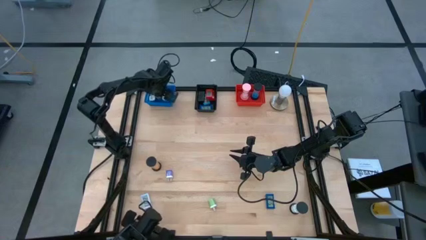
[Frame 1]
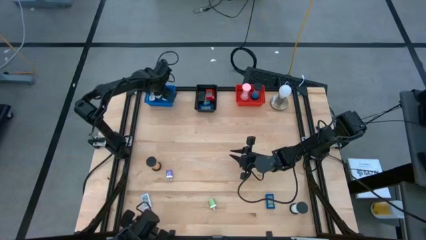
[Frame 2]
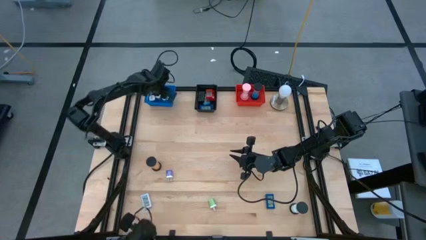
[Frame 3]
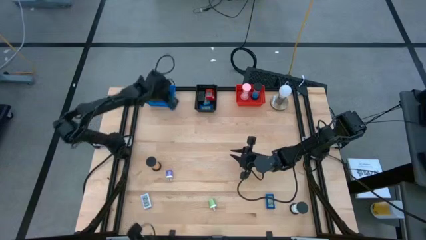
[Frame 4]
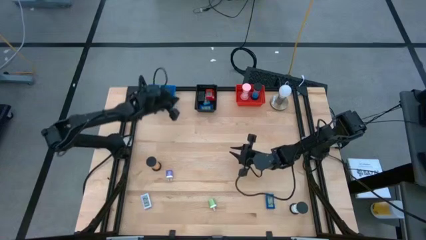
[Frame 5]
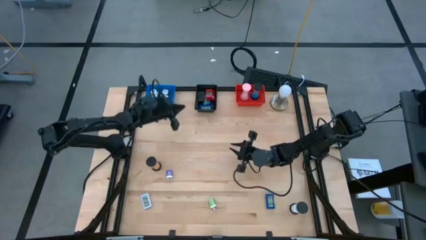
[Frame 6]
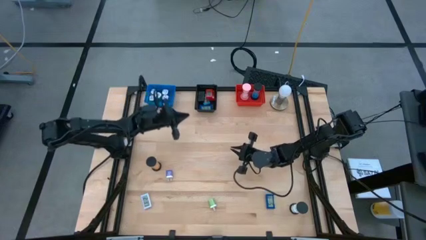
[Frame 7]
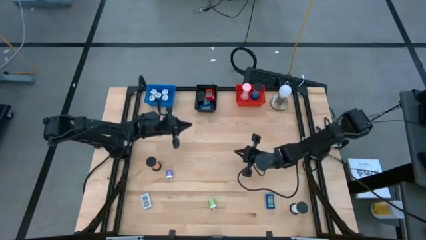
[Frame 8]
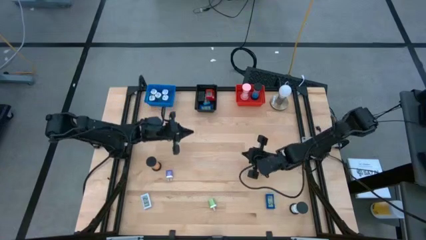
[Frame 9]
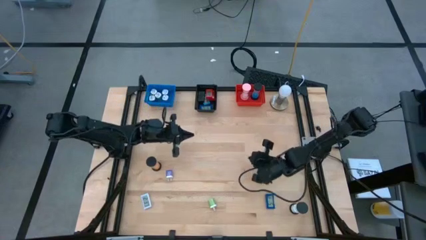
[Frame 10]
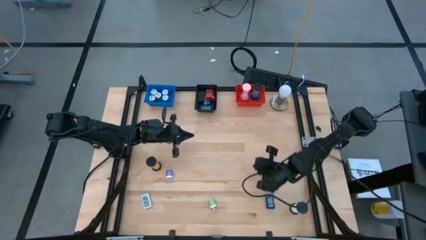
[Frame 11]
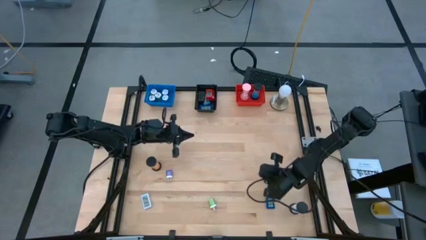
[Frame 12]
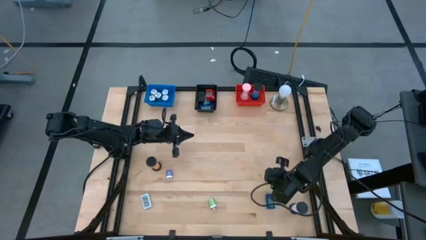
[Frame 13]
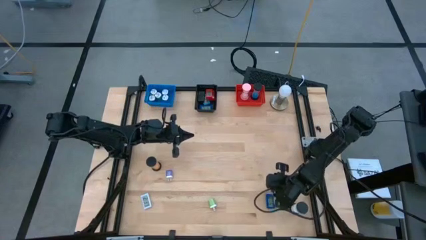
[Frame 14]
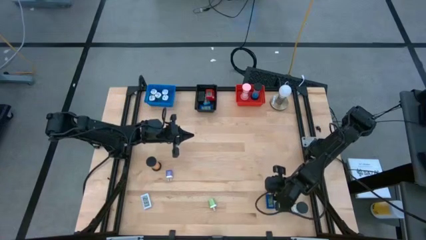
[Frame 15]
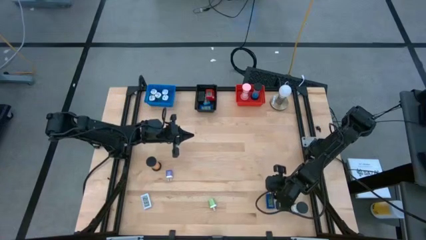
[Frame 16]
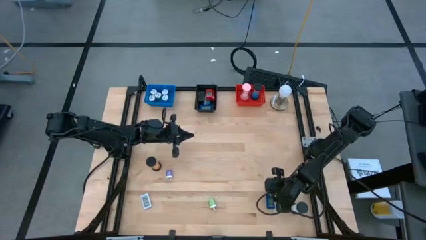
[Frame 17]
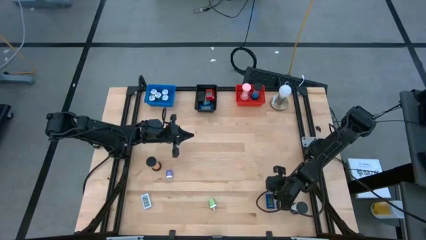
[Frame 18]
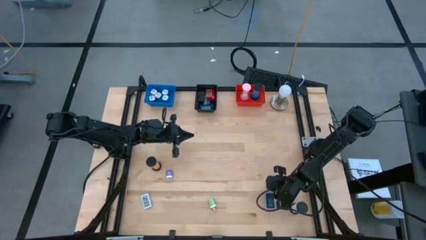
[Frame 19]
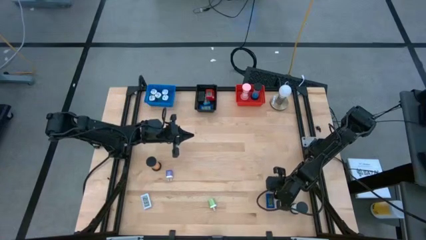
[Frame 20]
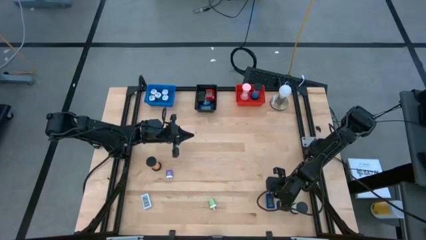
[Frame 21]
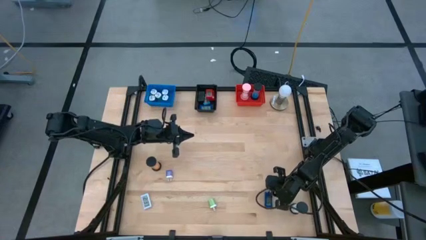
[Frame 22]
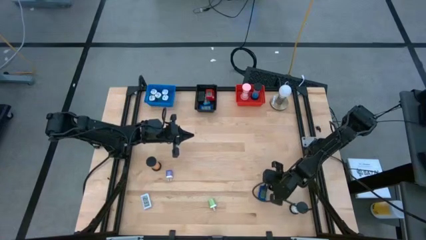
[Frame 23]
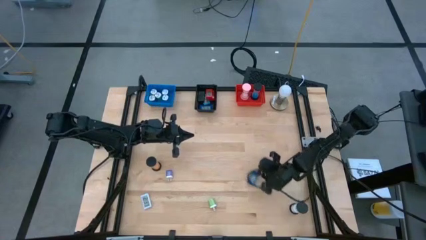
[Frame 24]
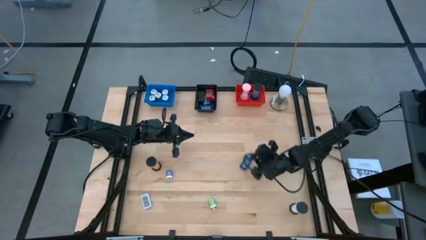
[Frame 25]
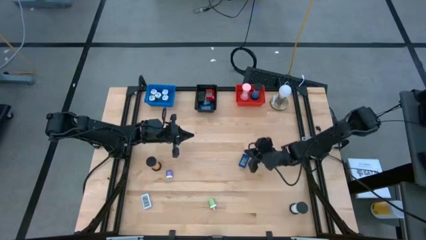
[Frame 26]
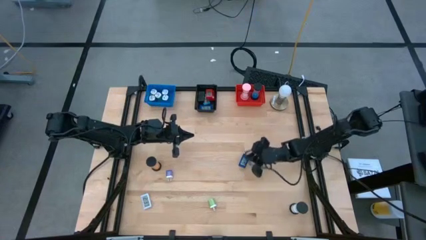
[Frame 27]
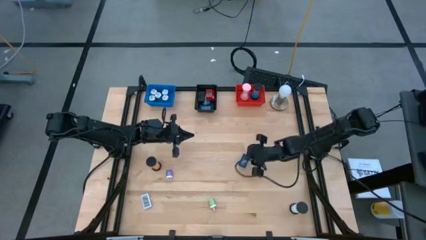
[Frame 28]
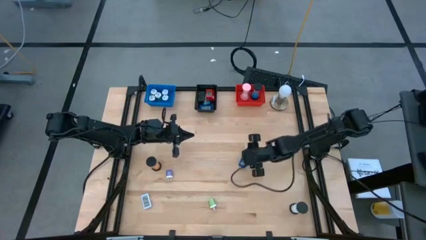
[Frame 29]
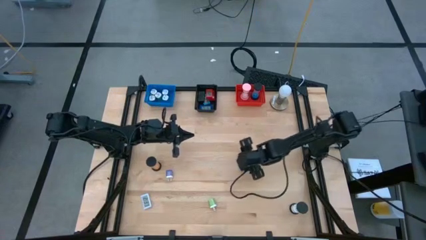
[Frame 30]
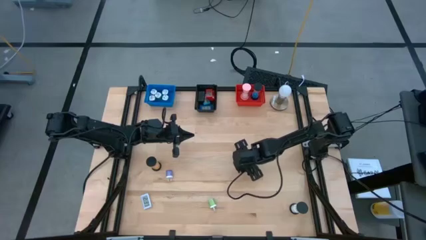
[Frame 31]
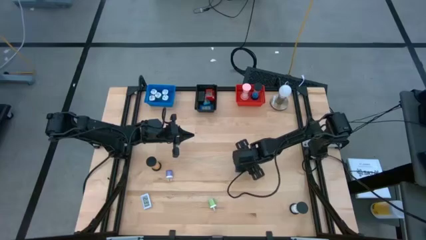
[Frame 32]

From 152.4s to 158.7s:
Task: Pick & Place Office items
Put the blue digital clock into the black bin

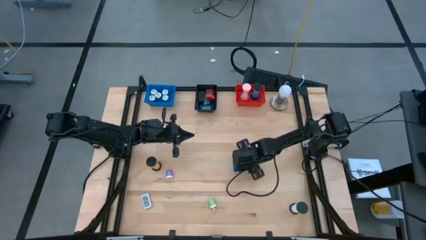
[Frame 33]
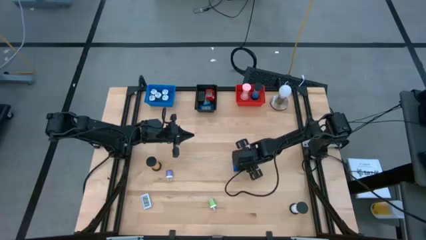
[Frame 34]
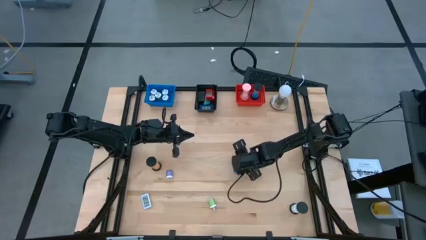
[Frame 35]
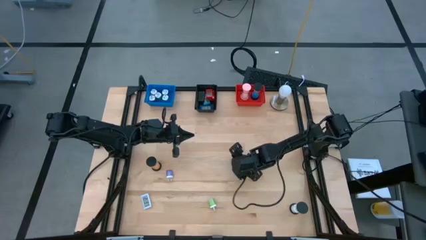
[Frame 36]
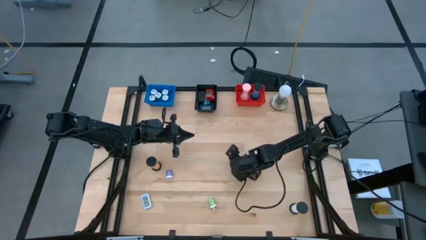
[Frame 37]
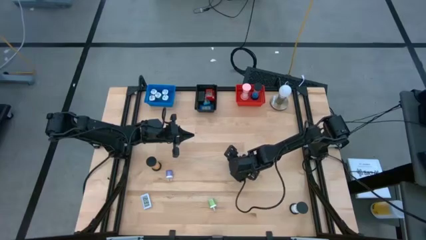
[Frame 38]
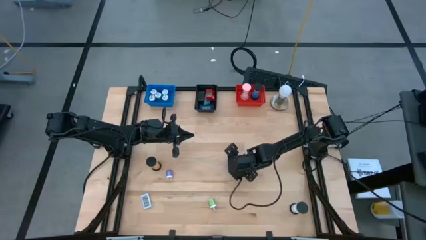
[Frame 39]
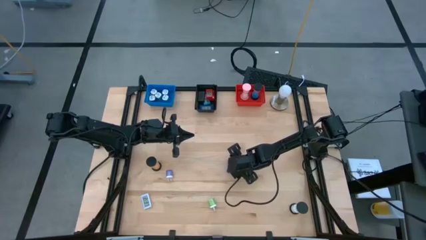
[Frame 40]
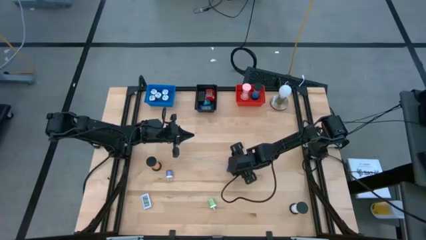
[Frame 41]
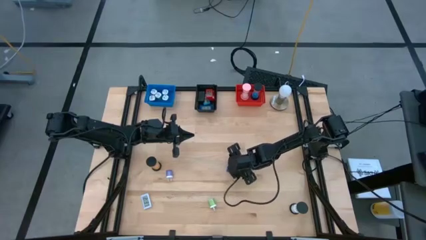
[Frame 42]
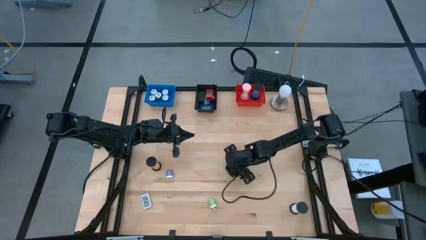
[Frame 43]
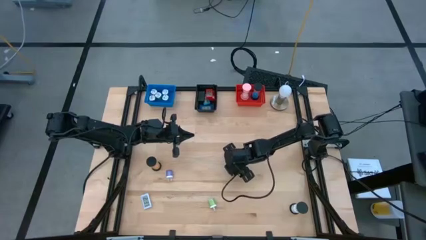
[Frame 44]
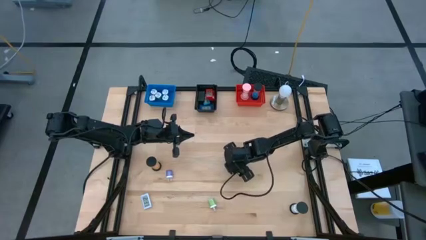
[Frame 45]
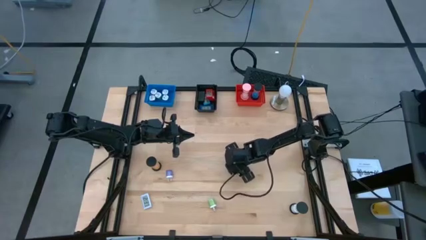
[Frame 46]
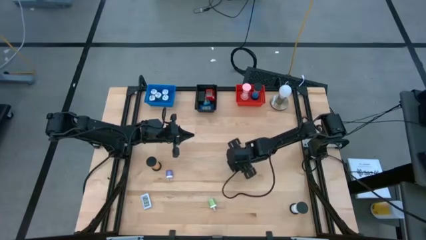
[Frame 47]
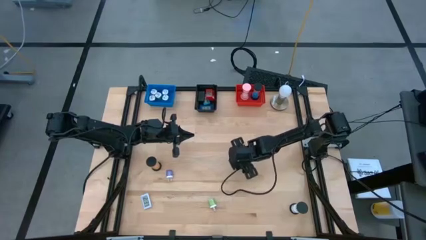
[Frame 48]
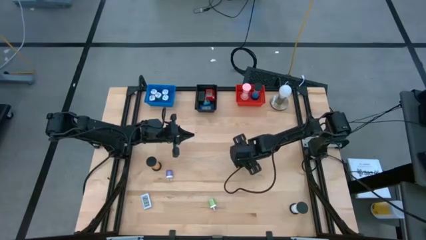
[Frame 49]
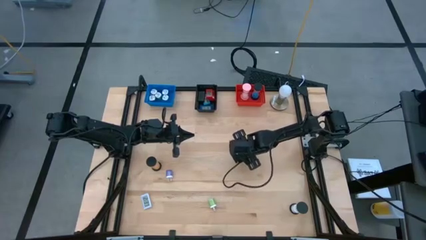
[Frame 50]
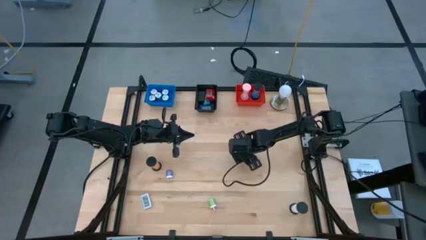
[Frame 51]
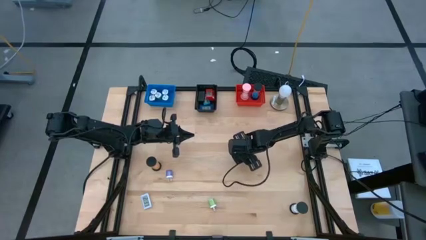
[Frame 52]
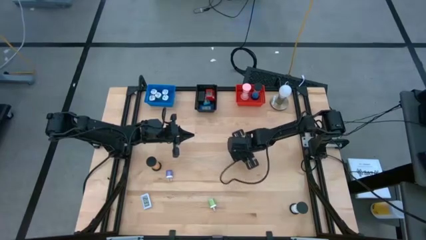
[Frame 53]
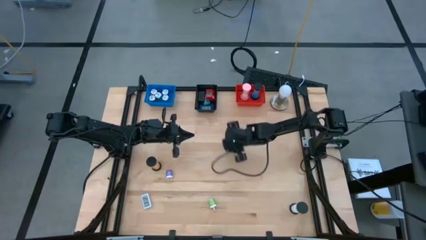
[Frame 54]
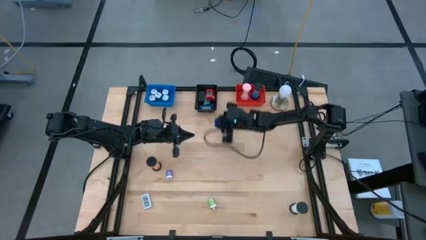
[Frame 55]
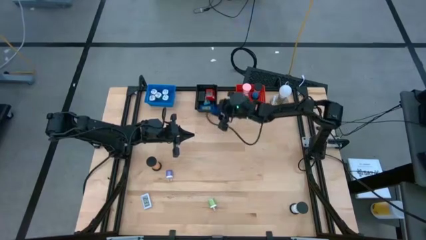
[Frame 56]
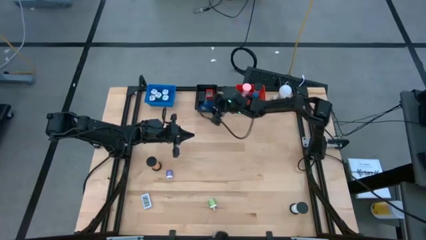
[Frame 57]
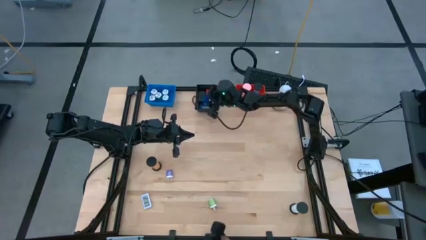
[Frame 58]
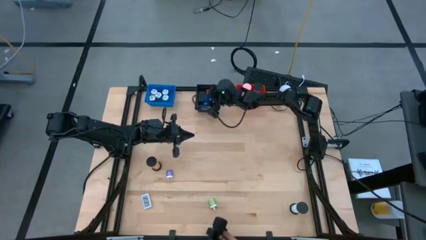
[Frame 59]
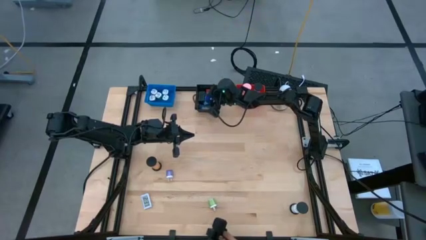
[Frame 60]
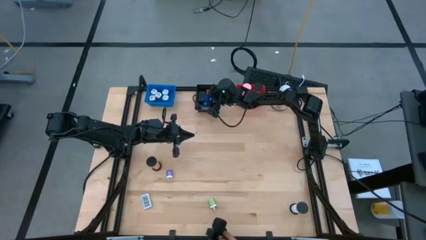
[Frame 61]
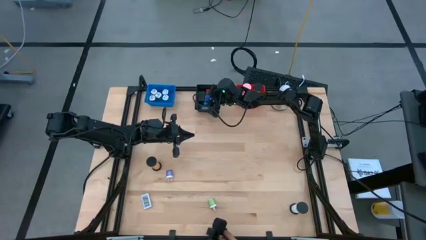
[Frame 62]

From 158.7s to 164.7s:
Put the blue digital clock into the black bin
